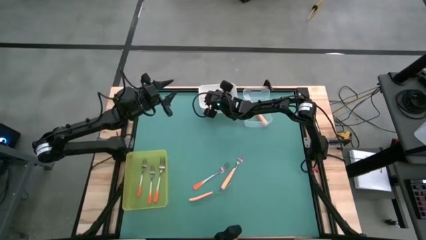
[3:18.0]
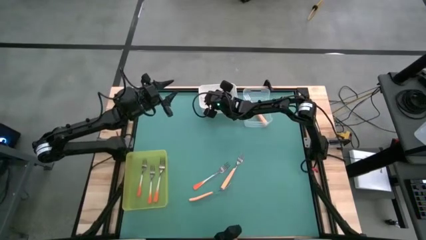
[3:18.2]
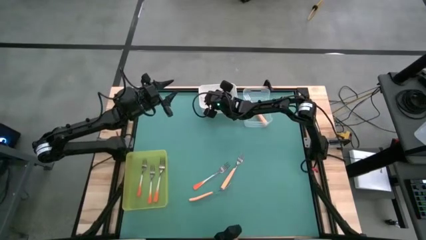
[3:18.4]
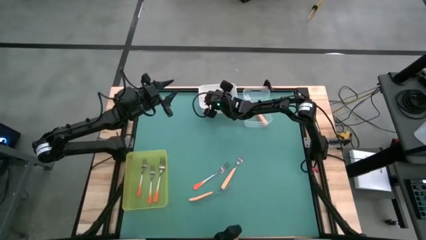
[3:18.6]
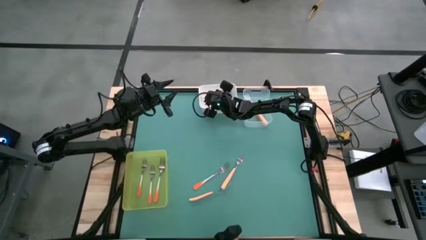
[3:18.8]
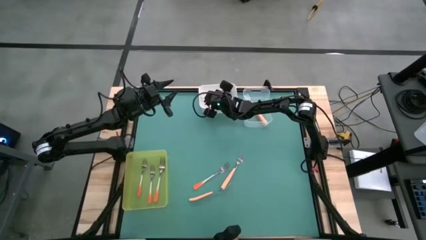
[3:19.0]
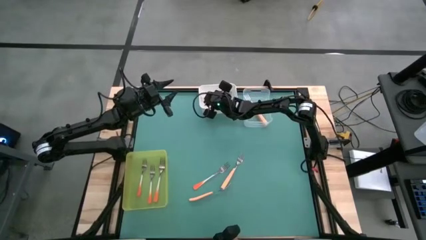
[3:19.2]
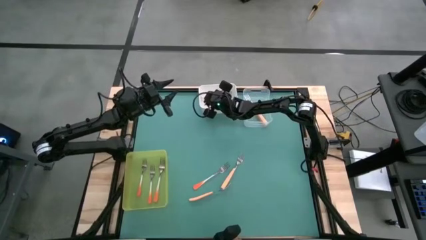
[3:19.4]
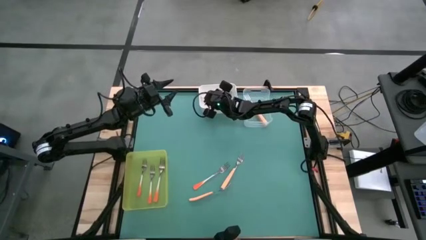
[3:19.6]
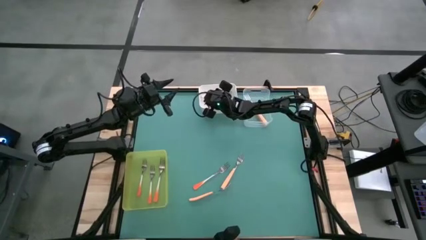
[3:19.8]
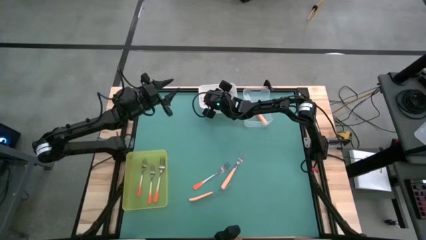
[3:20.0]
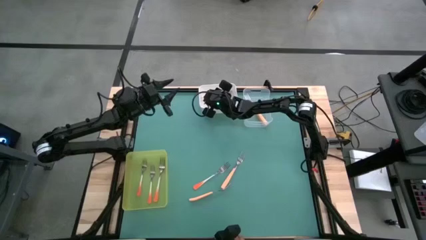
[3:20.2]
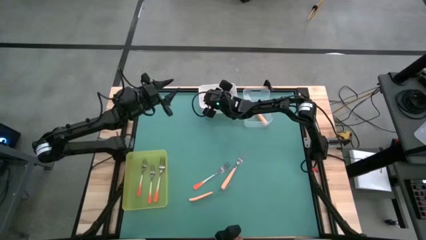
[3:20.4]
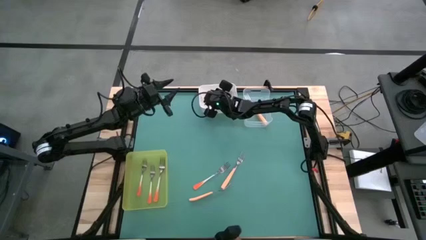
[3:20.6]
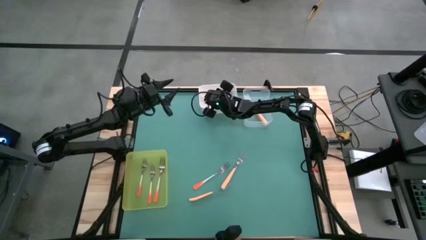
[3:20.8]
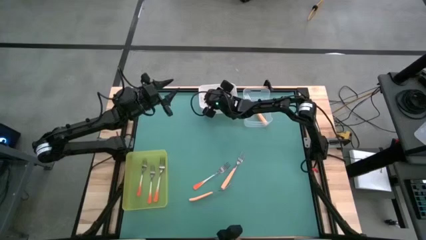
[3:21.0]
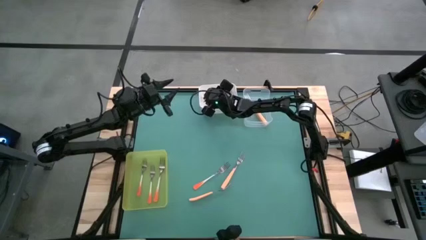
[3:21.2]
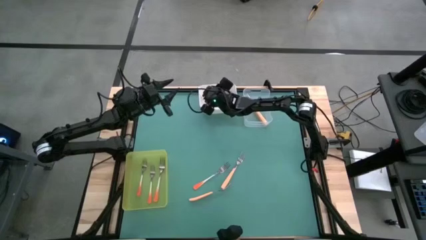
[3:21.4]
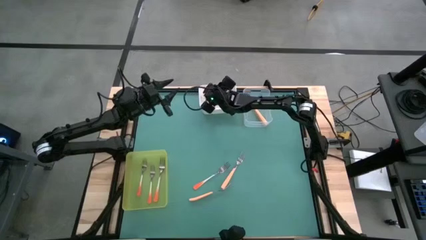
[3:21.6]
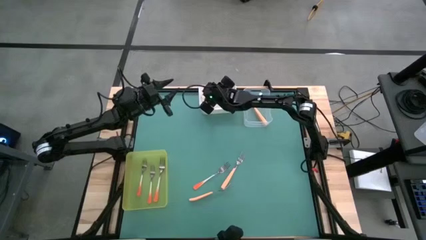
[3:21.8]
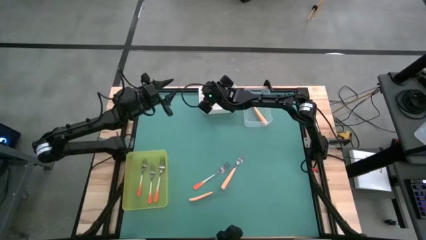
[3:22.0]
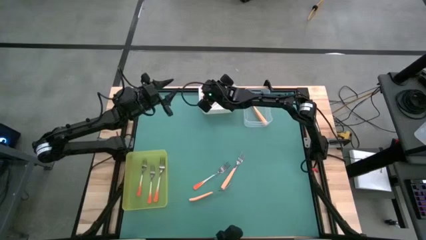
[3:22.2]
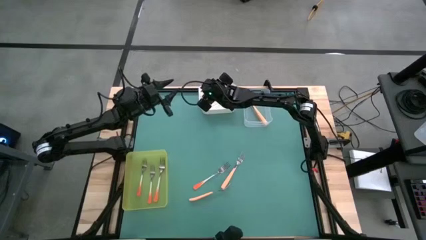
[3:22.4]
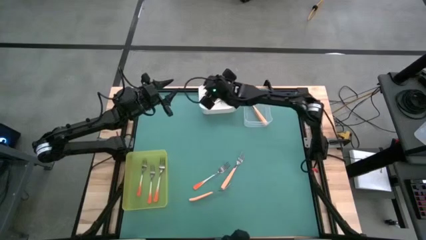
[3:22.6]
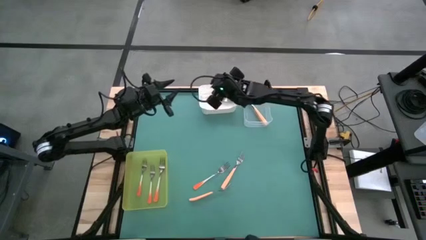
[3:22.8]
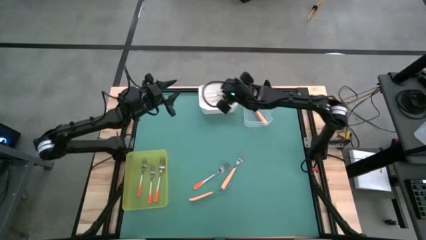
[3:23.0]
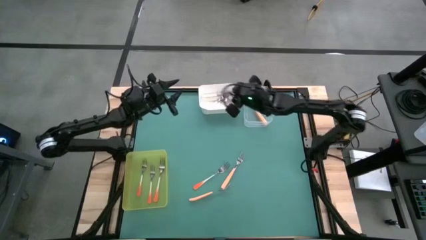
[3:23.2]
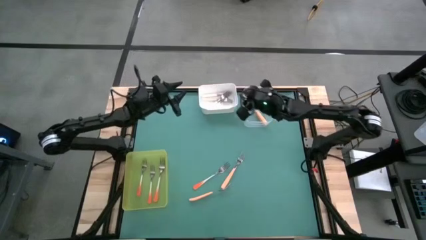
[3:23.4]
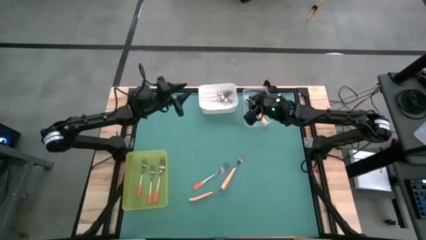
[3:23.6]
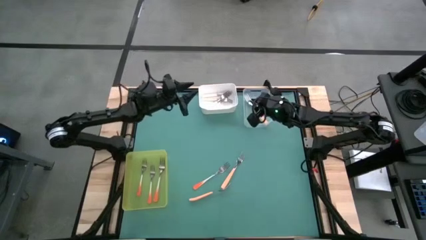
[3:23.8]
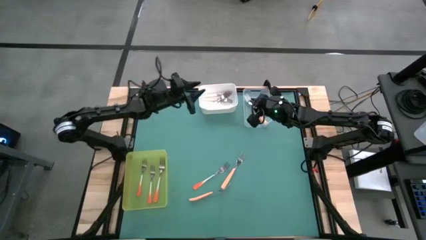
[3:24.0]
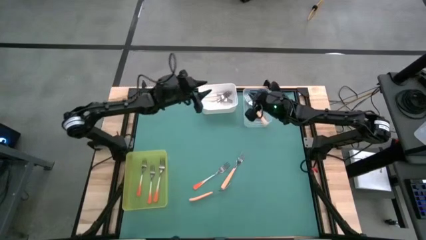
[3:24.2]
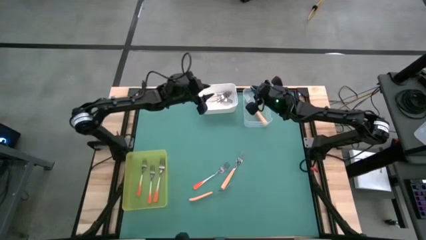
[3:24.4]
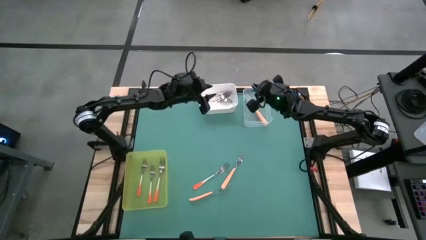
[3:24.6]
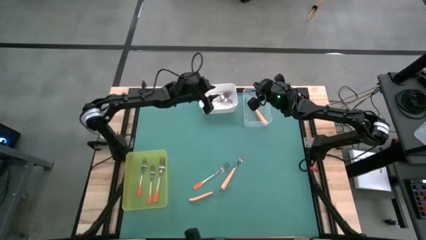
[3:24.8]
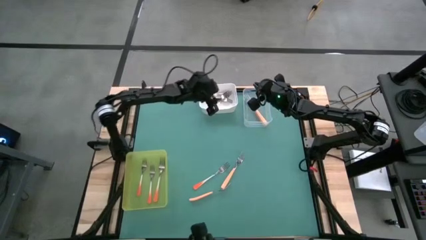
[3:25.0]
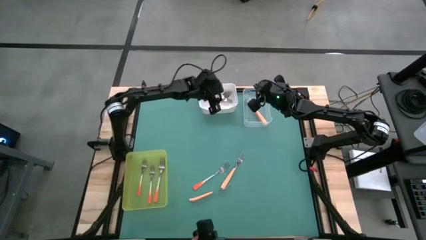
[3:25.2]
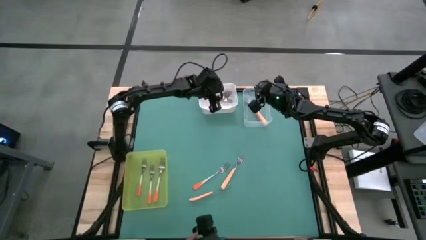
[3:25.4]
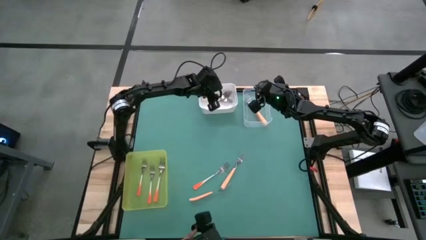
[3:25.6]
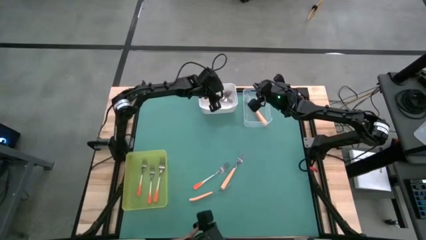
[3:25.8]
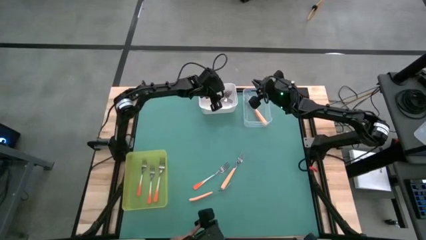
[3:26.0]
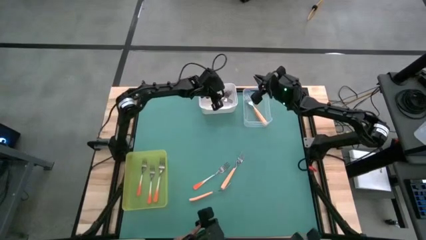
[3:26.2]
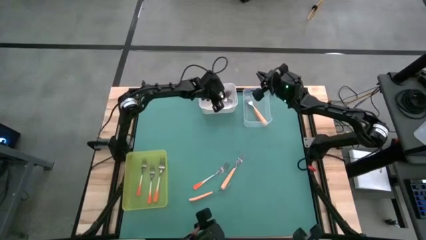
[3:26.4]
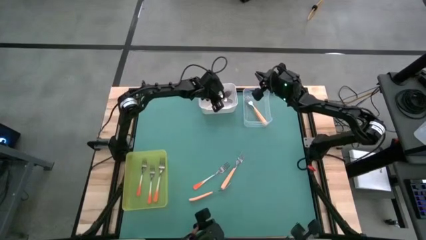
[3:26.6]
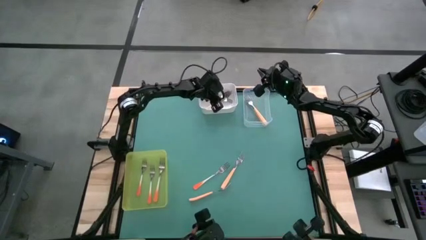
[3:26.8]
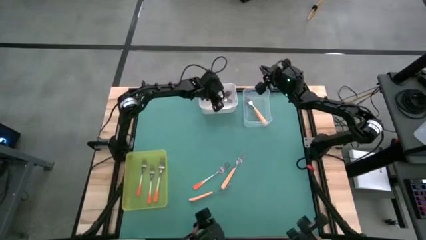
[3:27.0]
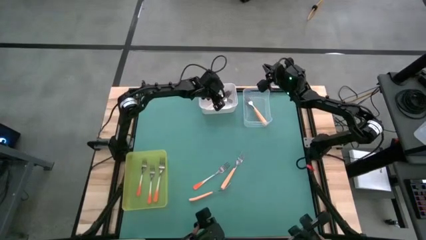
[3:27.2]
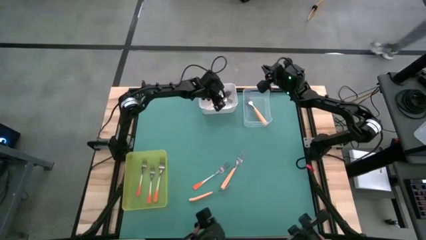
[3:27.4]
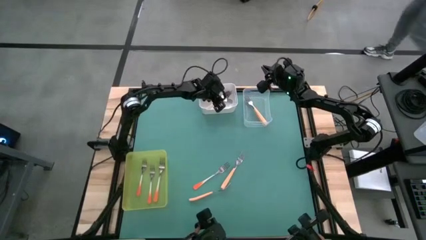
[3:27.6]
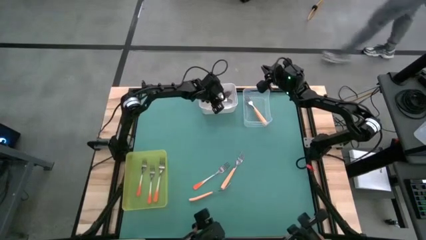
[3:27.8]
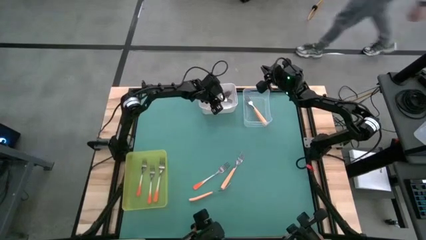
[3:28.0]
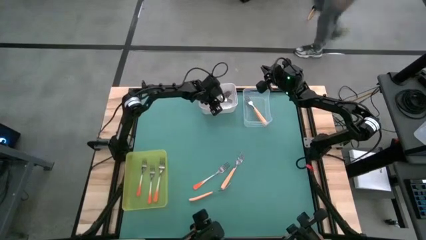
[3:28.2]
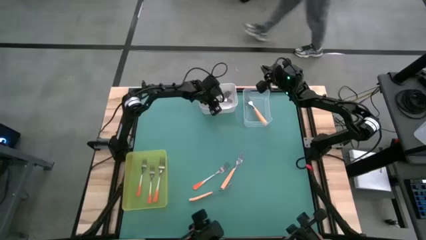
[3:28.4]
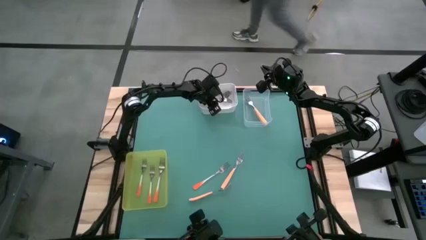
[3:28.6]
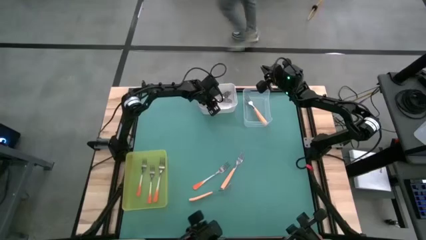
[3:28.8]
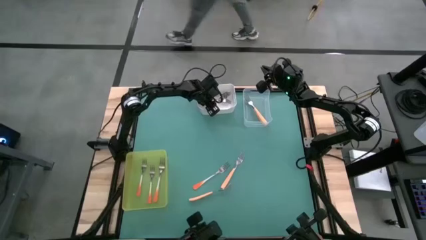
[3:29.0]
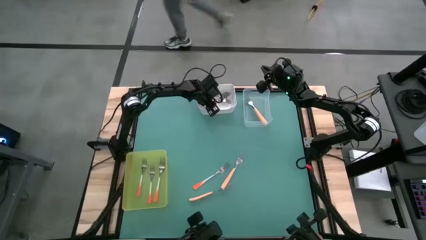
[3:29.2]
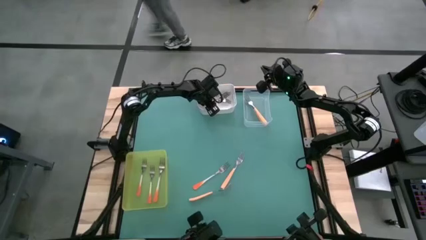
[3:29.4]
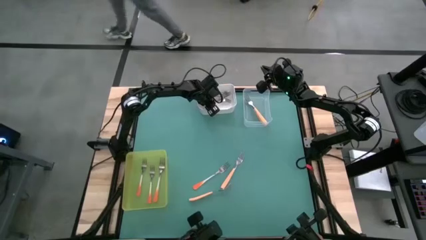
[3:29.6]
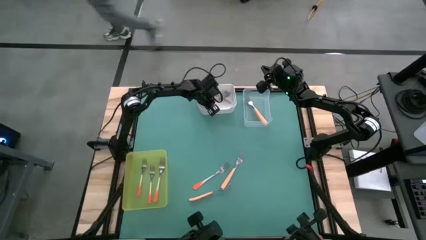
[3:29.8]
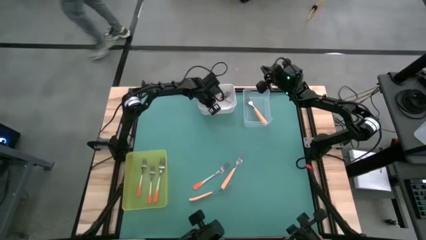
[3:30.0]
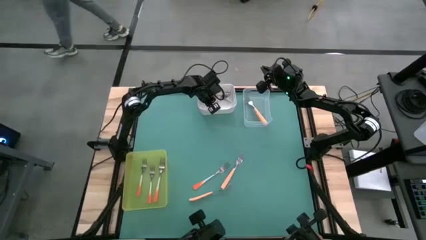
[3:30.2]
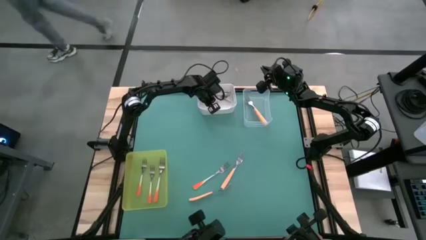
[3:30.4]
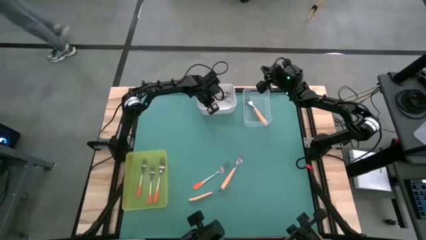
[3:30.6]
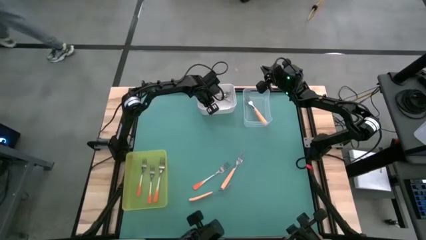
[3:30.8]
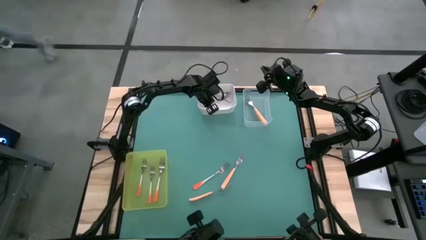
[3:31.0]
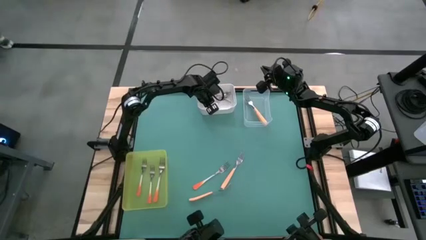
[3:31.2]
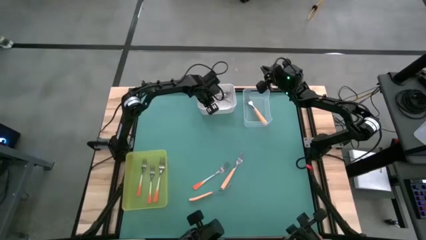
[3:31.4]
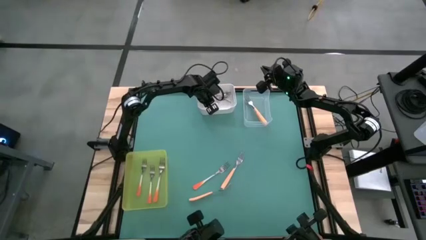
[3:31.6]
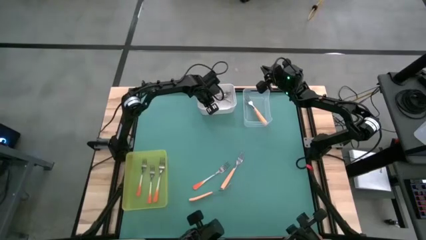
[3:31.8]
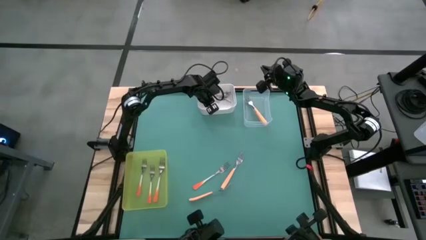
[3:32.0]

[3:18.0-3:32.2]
Task: Sort silverware by color (type)
Put the white fork into the white bin

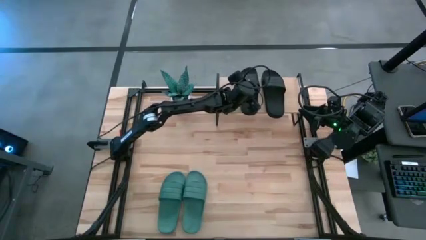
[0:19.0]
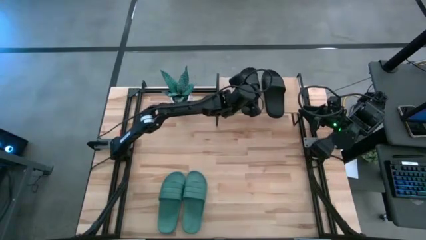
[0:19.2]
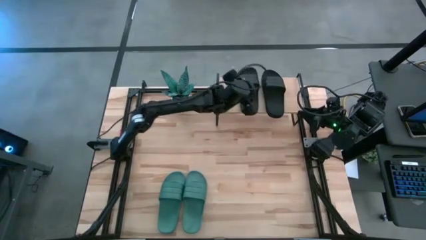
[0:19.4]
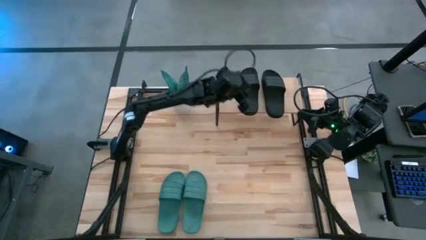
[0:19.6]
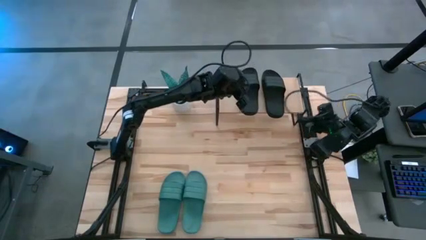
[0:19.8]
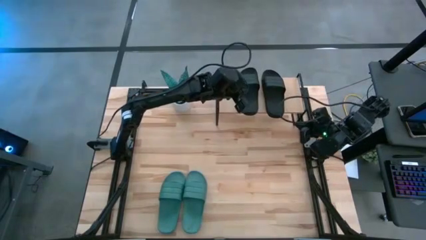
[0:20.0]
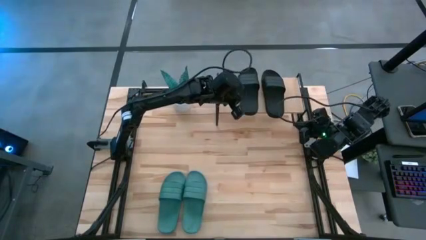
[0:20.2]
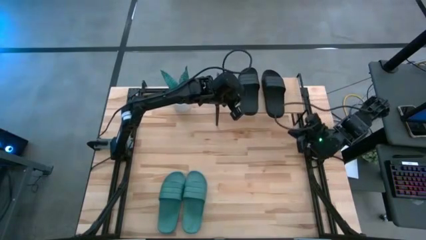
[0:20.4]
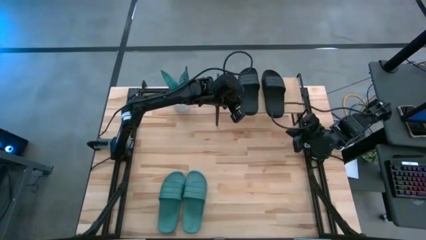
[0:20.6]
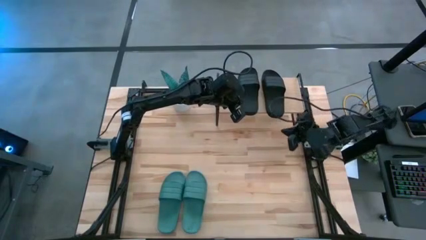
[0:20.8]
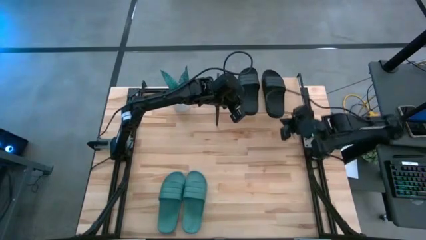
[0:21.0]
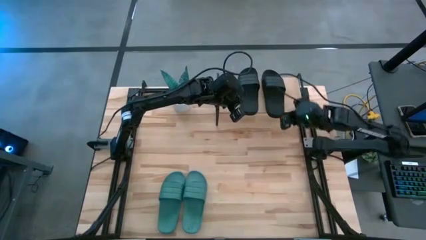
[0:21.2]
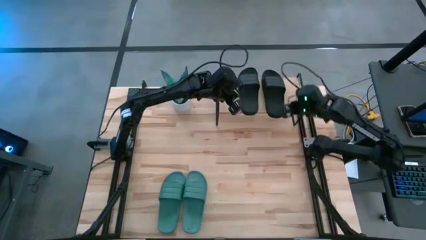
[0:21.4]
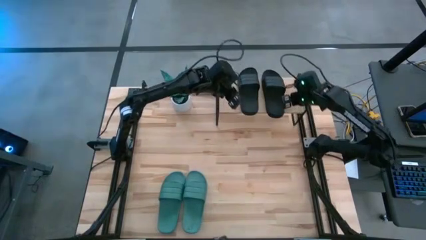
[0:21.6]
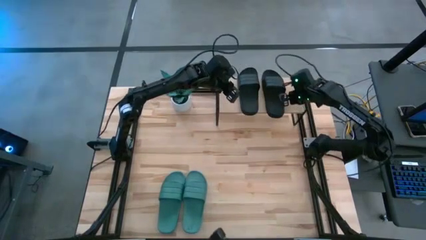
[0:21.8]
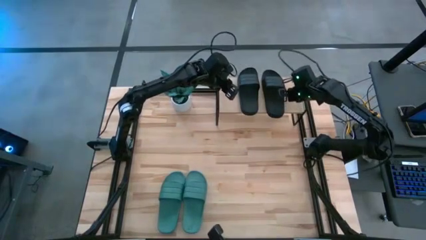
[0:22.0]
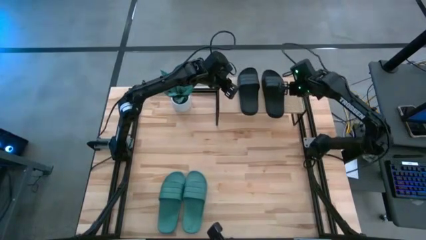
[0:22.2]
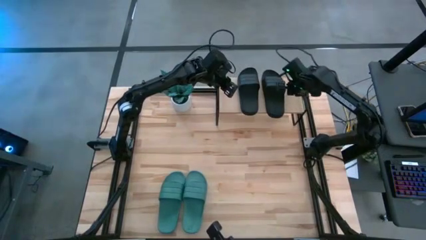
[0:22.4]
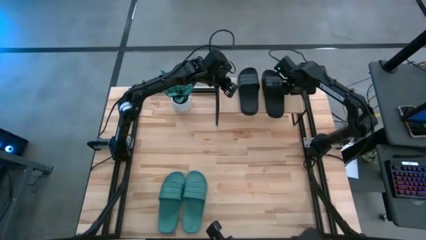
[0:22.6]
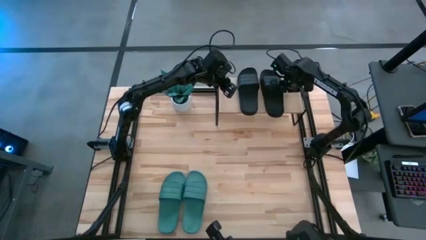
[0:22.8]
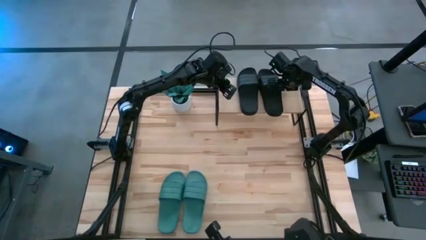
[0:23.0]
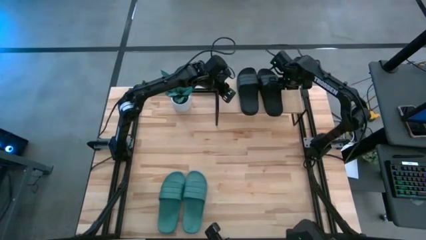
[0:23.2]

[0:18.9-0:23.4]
Task: Pick and place slides into the shelf
Adjust the right black slipper on the shelf
